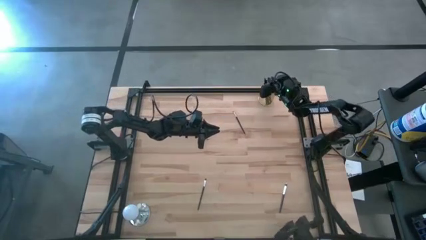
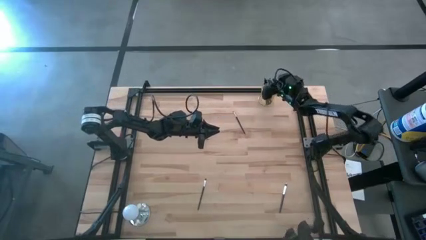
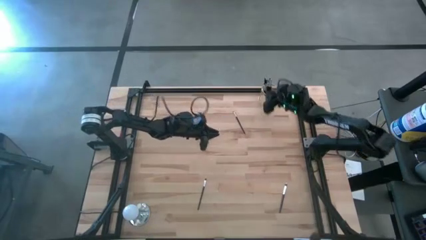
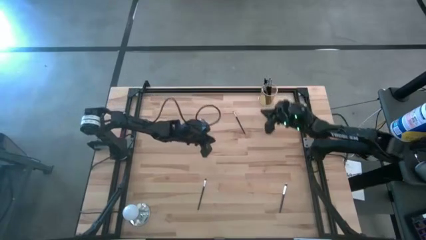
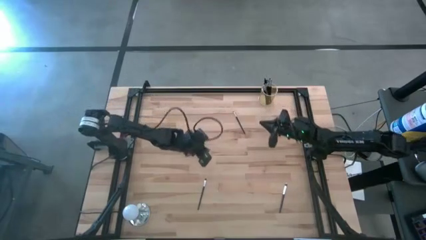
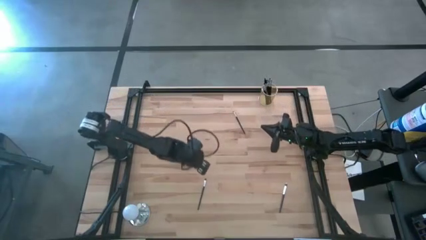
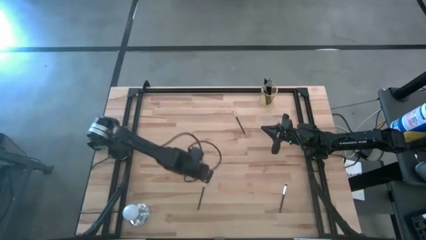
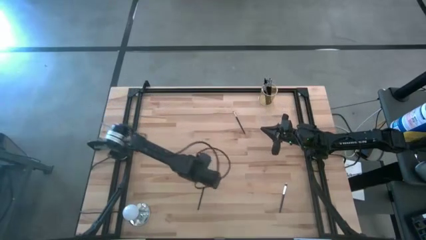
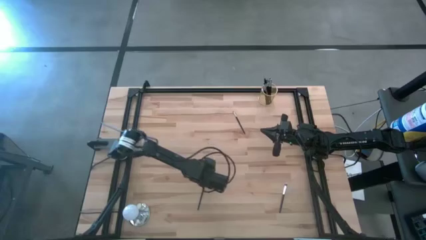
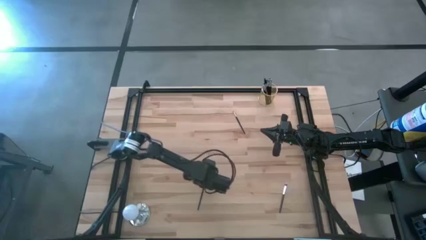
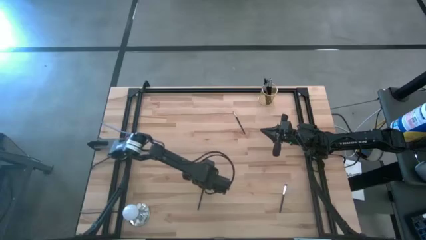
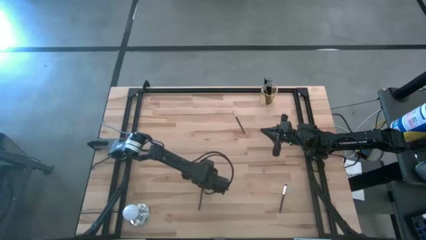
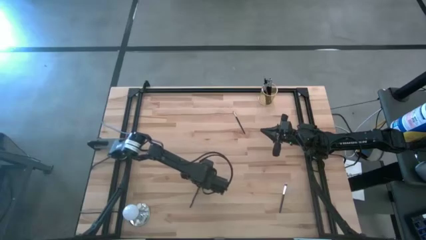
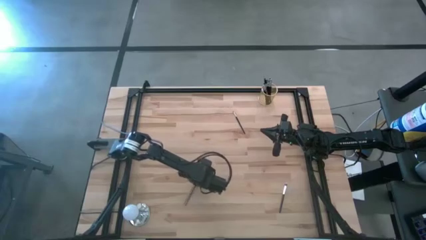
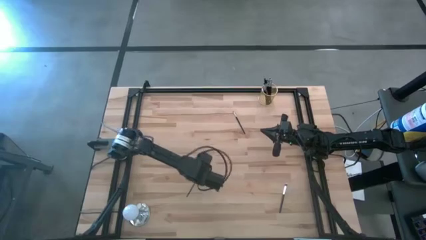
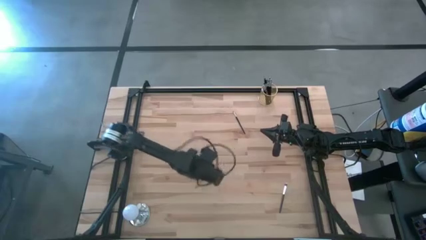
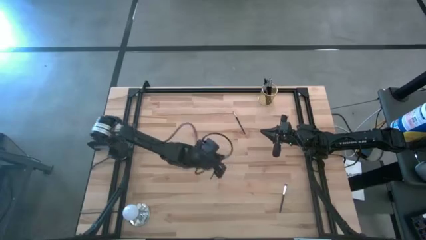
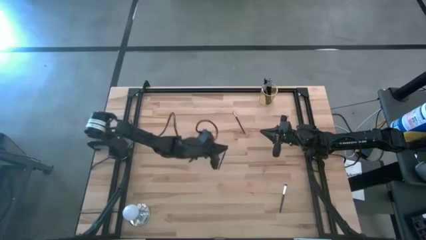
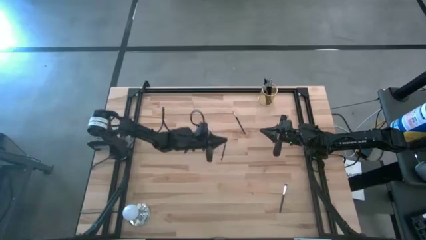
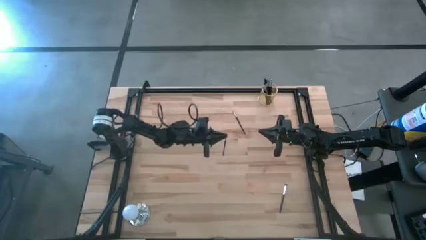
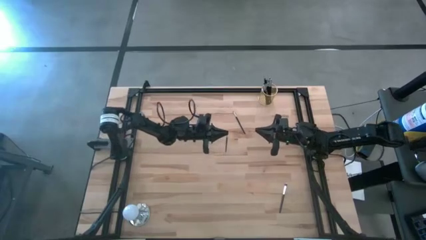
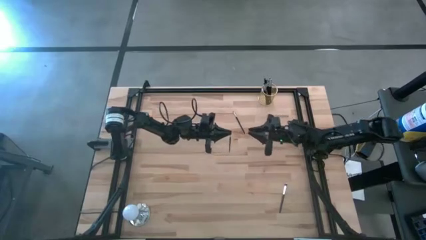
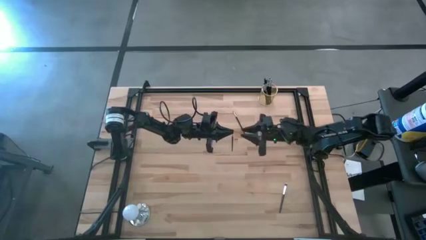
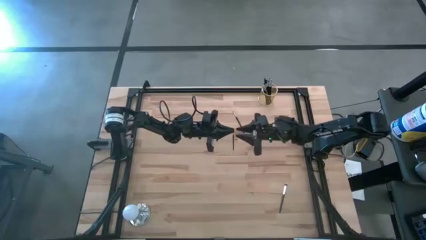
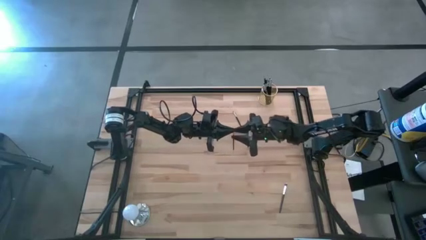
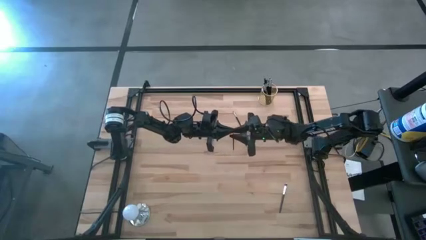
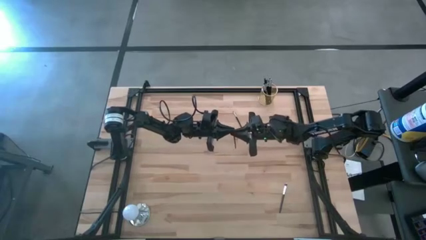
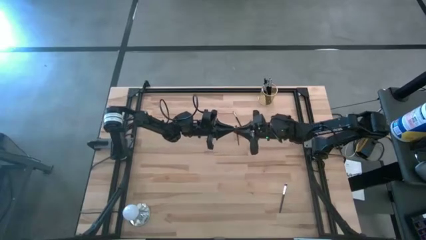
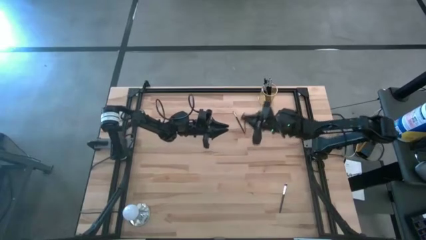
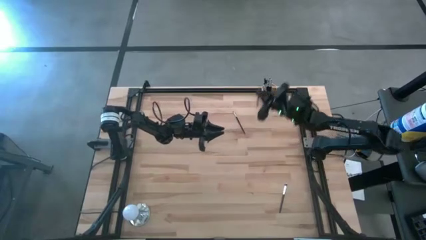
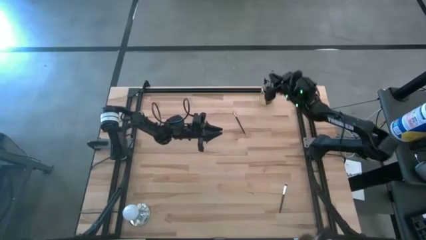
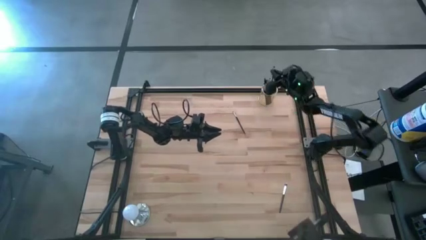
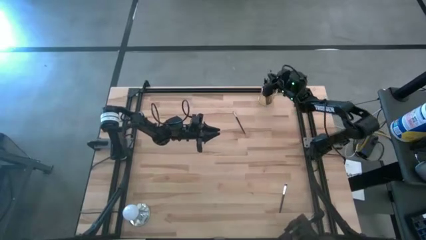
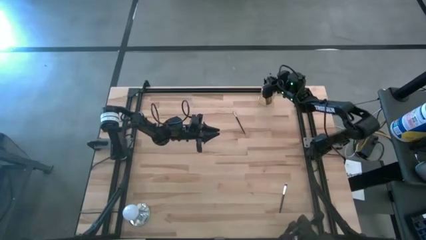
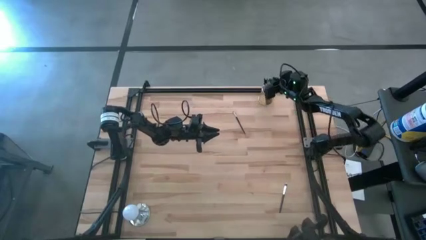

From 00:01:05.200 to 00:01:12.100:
Task: Put items in baskets/containers
Put the black eyeshadow brush into the gold pen holder

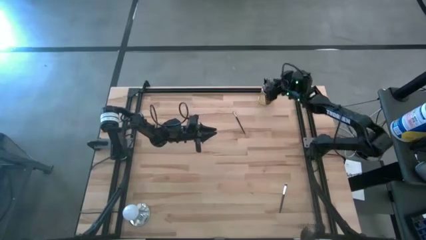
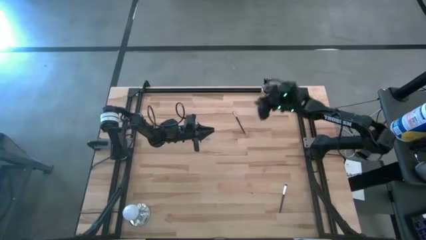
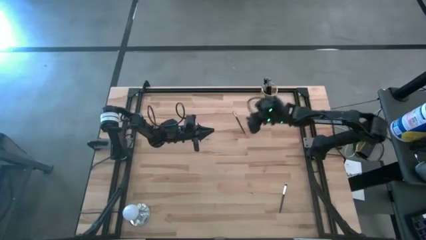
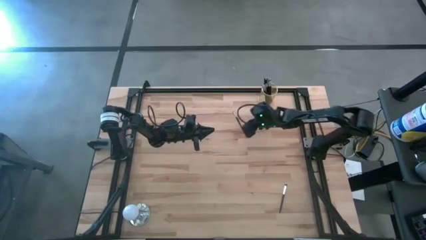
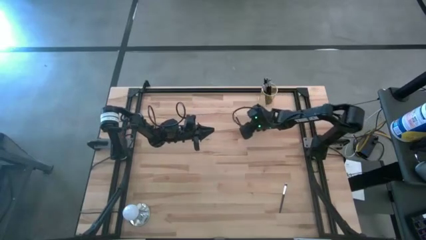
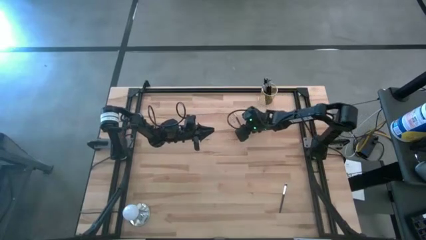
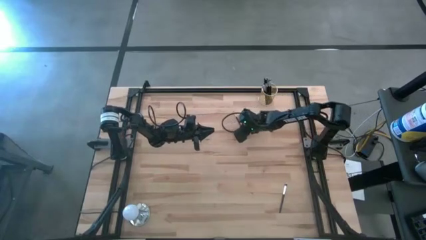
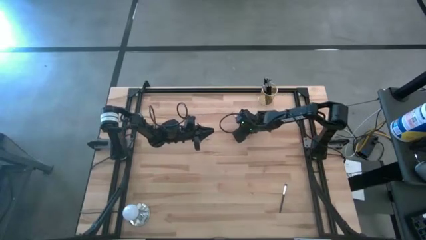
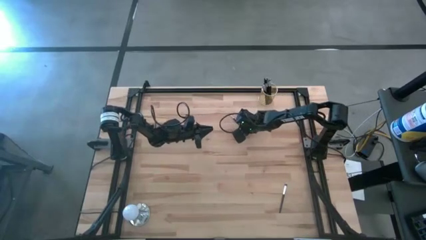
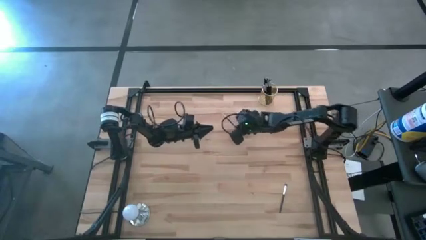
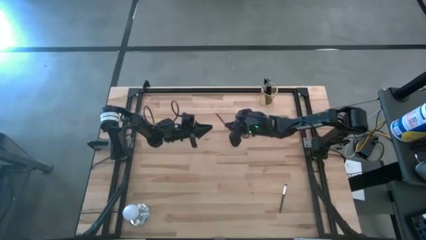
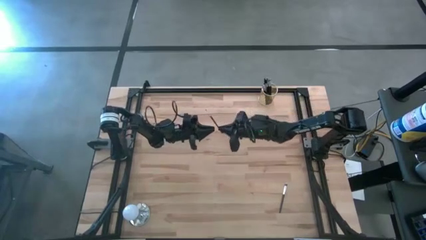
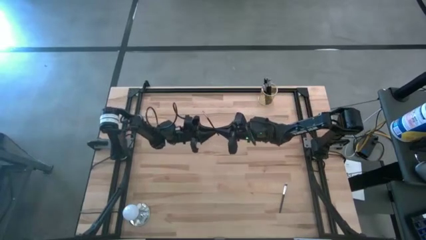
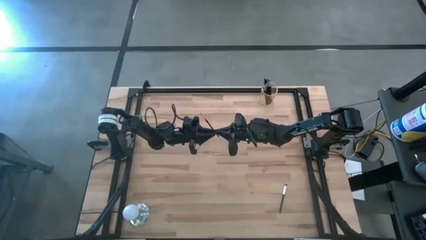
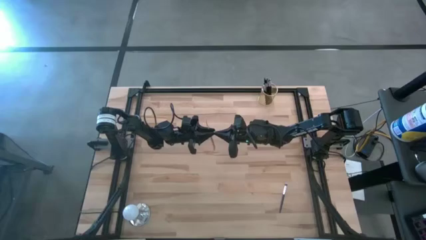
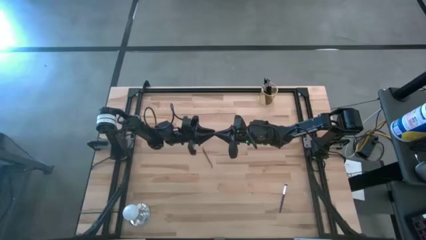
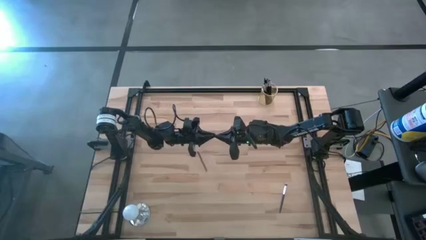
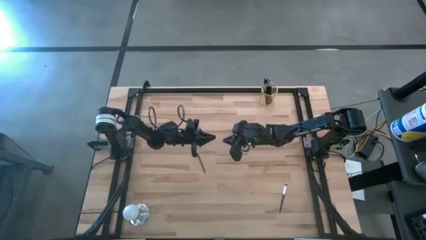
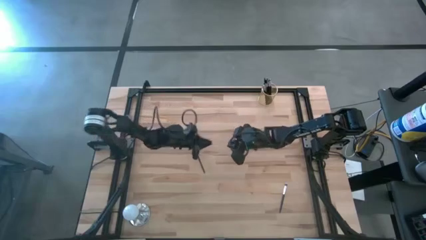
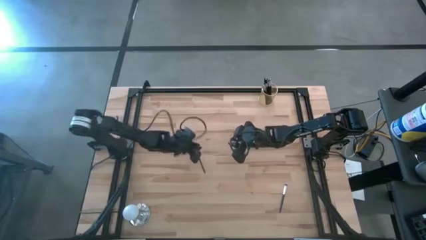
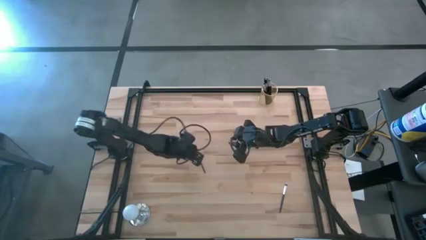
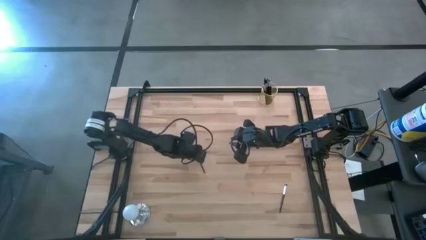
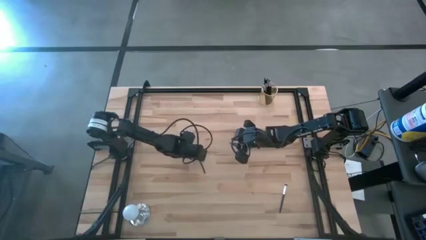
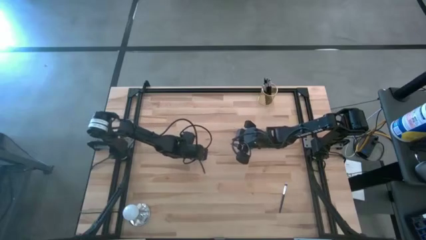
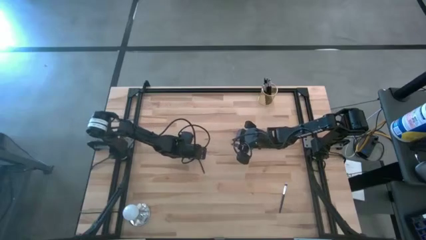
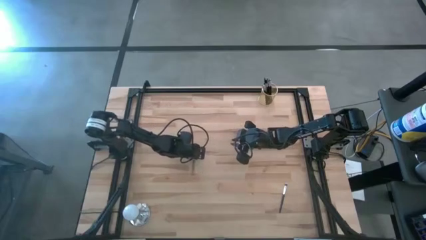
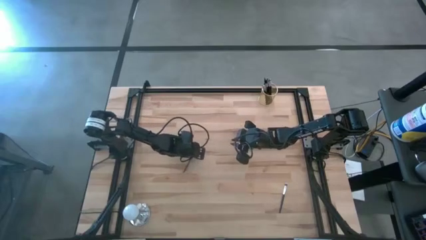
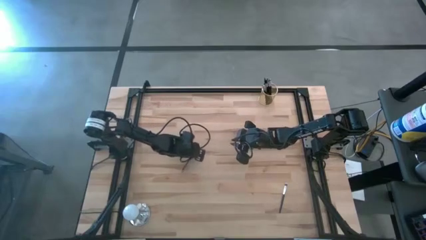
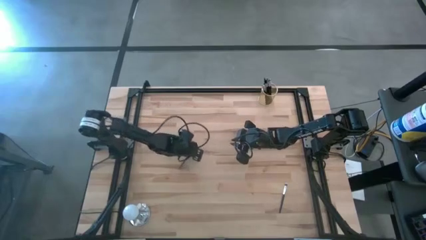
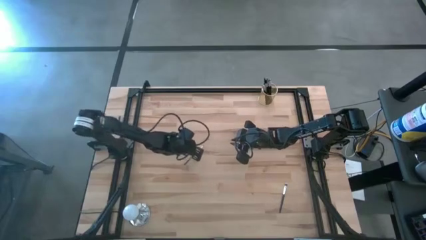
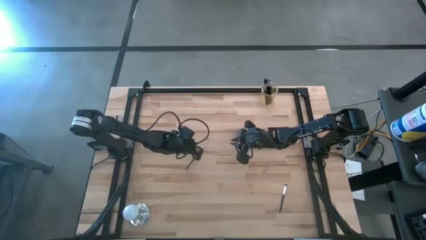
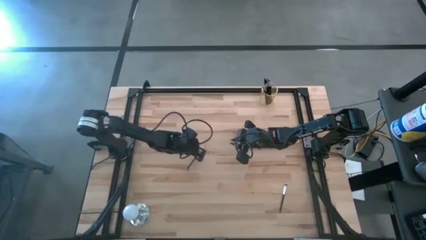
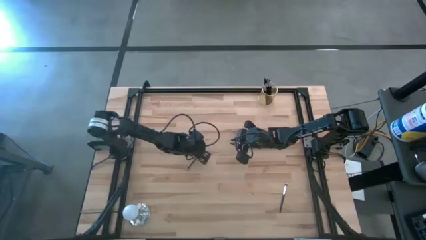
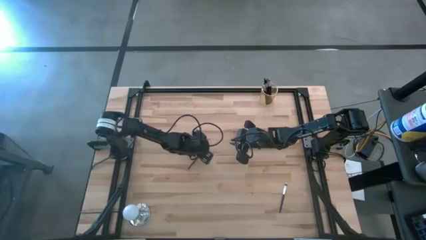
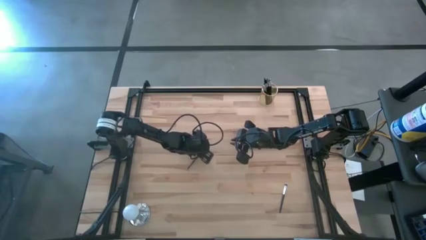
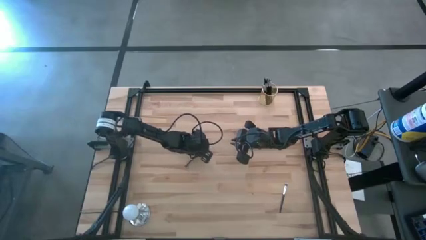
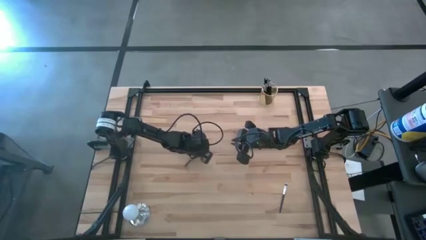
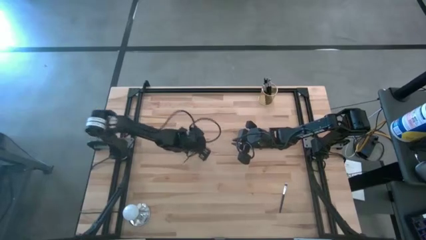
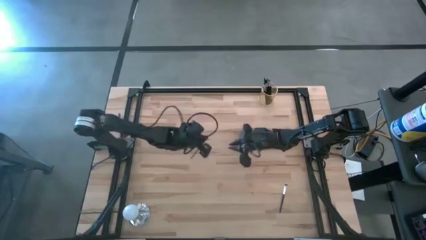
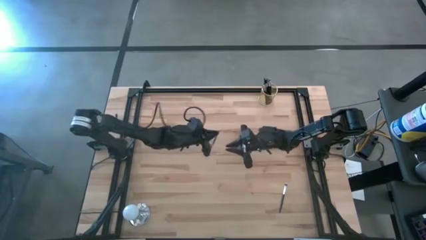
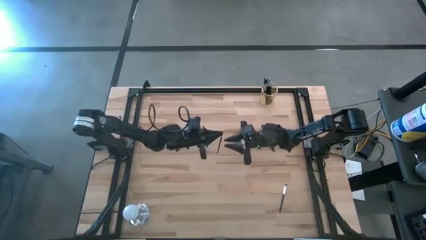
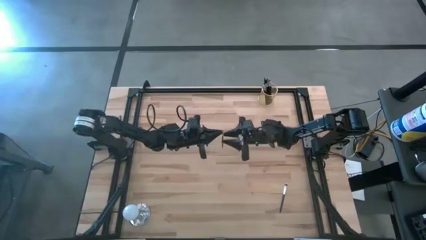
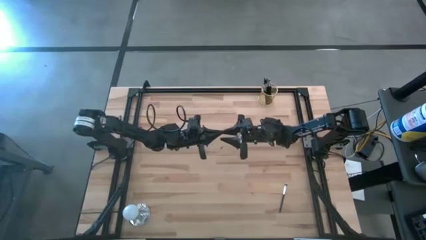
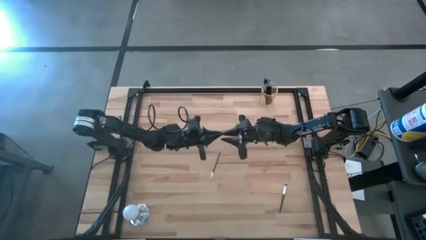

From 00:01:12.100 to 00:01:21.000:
Put the black eyeshadow brush into the gold pen holder
